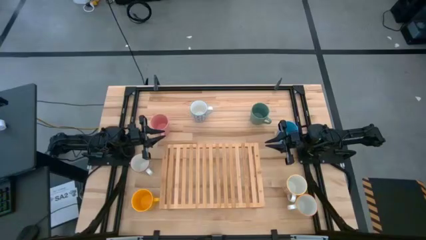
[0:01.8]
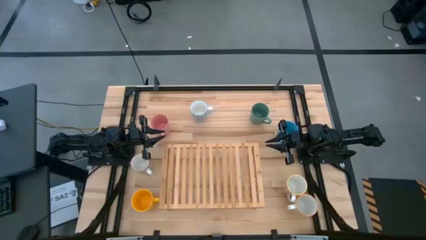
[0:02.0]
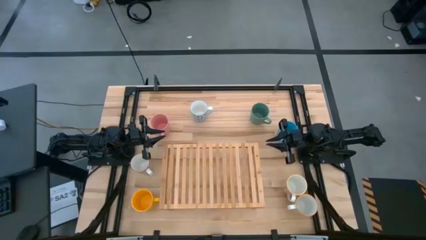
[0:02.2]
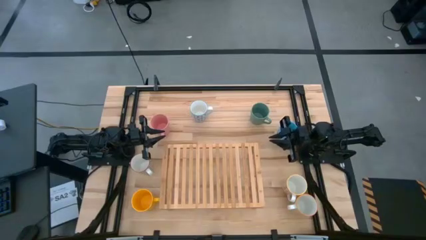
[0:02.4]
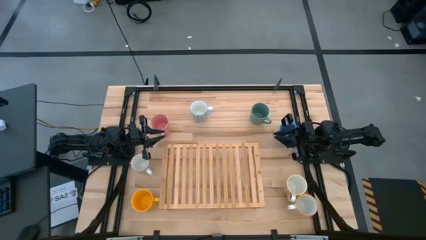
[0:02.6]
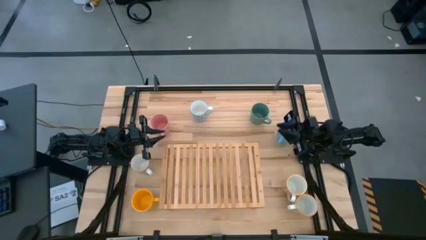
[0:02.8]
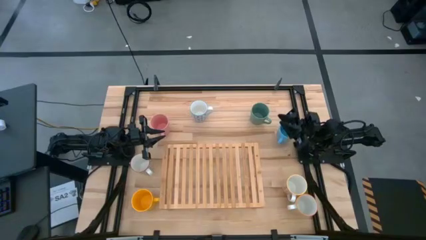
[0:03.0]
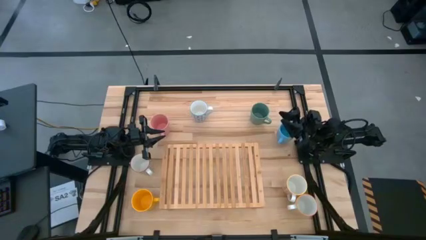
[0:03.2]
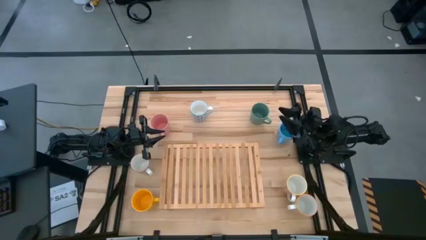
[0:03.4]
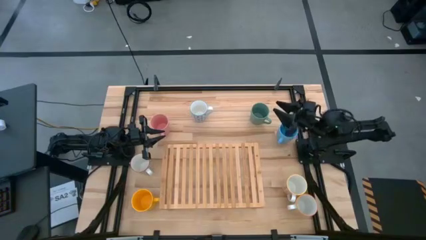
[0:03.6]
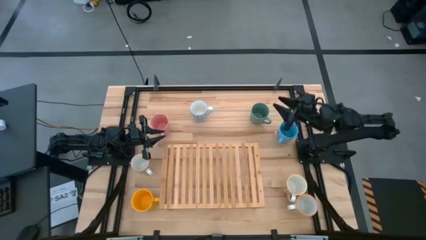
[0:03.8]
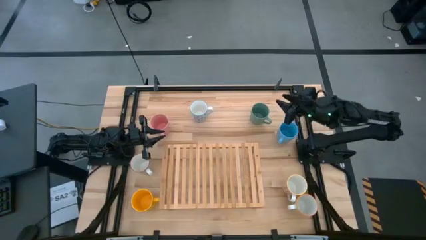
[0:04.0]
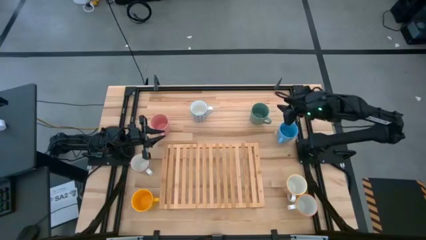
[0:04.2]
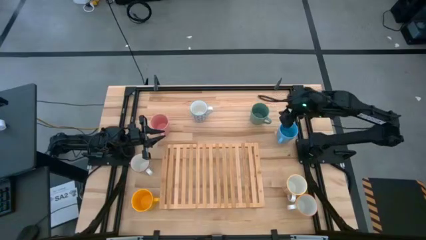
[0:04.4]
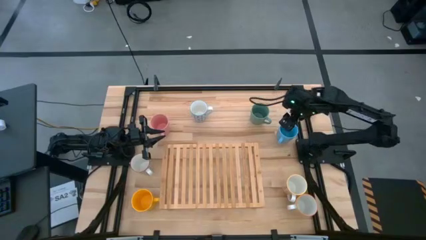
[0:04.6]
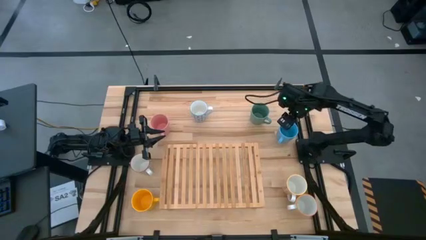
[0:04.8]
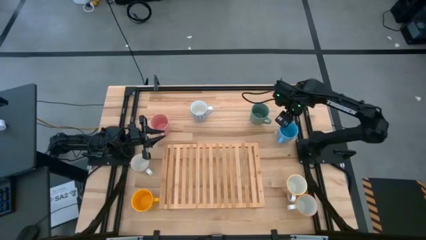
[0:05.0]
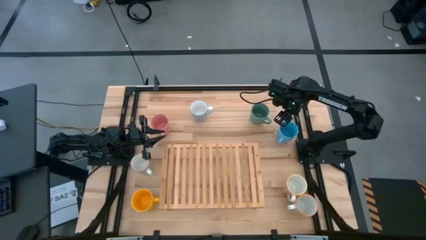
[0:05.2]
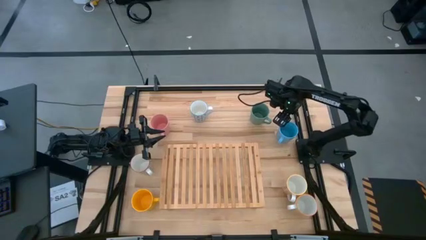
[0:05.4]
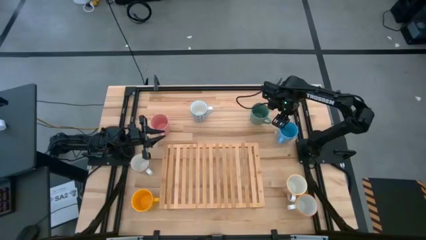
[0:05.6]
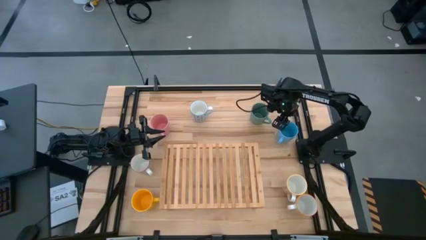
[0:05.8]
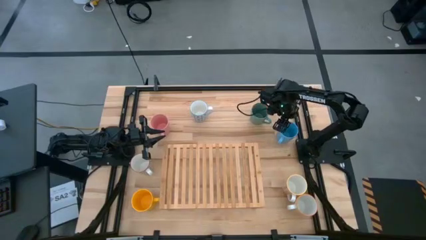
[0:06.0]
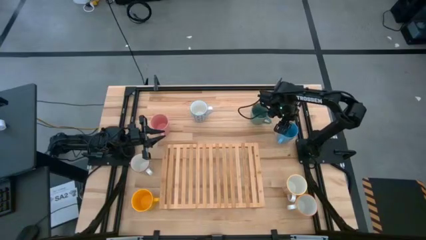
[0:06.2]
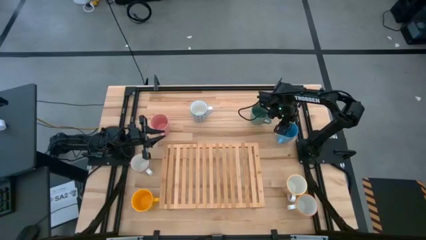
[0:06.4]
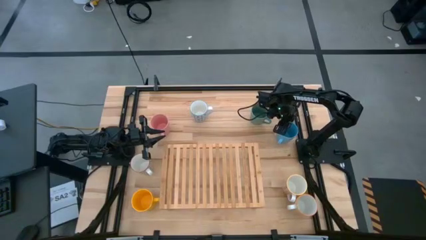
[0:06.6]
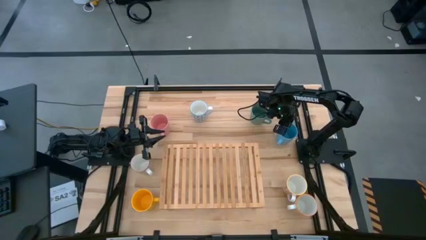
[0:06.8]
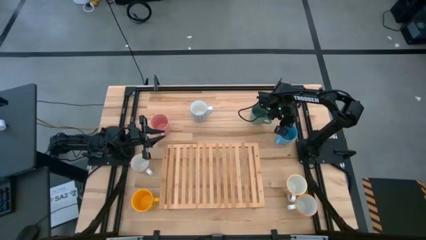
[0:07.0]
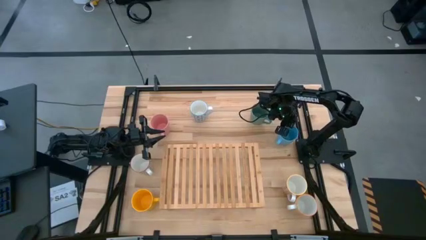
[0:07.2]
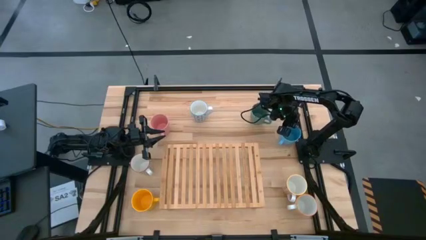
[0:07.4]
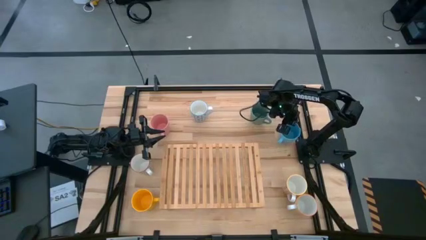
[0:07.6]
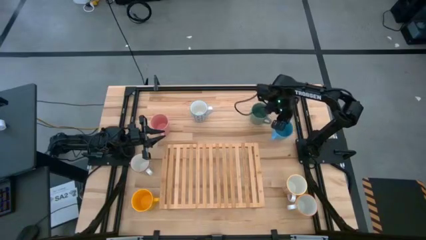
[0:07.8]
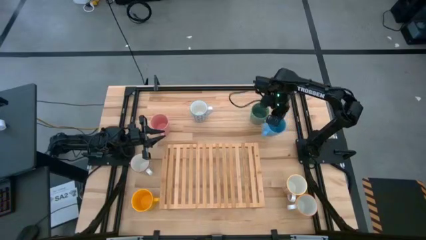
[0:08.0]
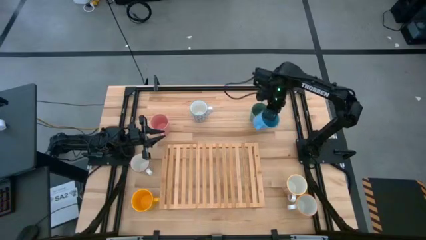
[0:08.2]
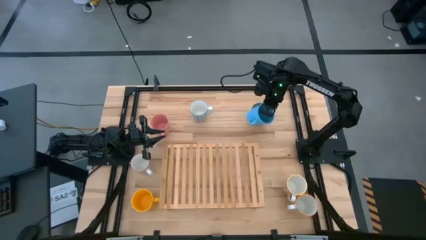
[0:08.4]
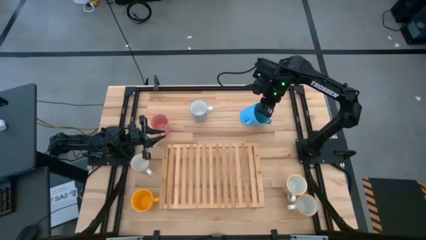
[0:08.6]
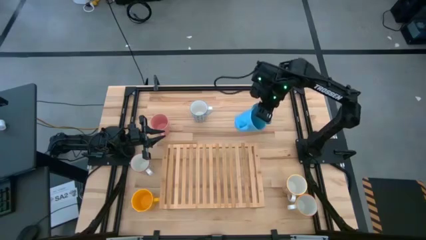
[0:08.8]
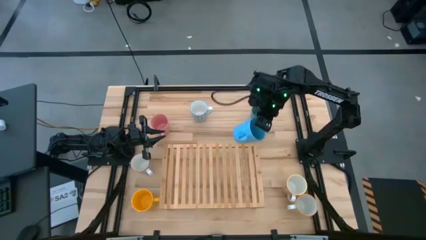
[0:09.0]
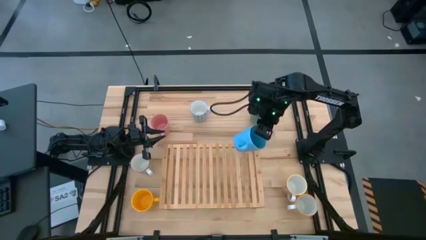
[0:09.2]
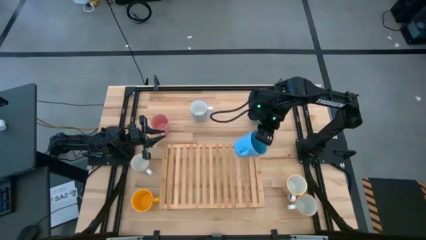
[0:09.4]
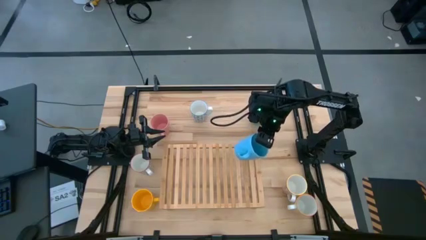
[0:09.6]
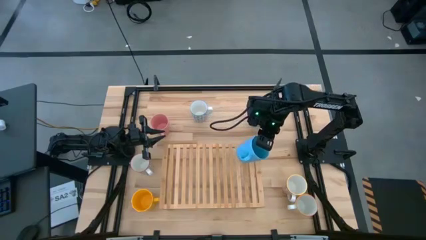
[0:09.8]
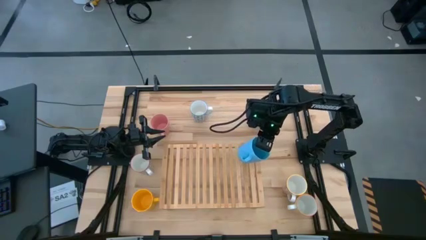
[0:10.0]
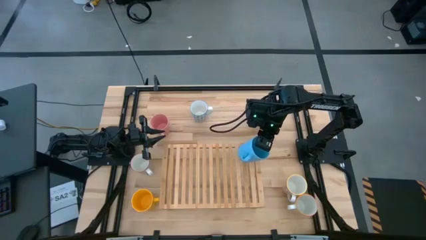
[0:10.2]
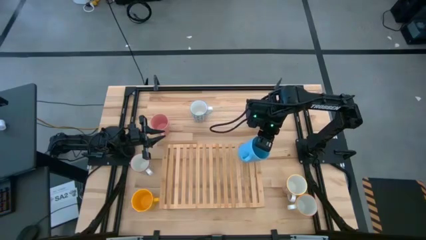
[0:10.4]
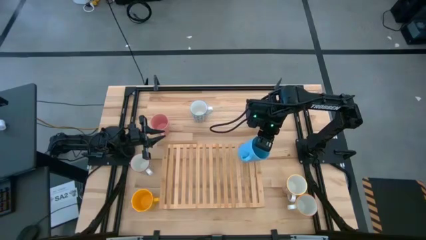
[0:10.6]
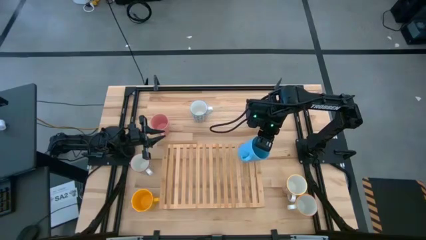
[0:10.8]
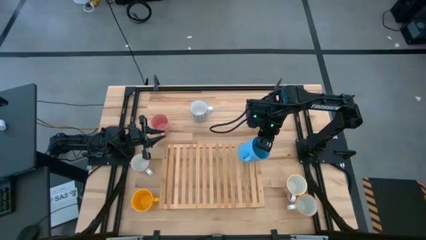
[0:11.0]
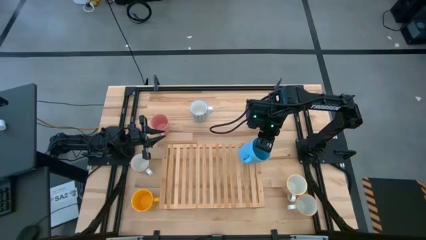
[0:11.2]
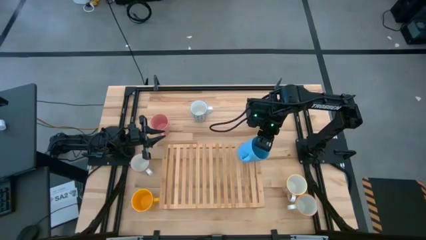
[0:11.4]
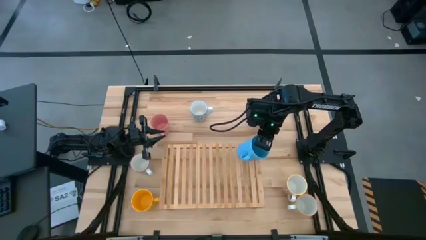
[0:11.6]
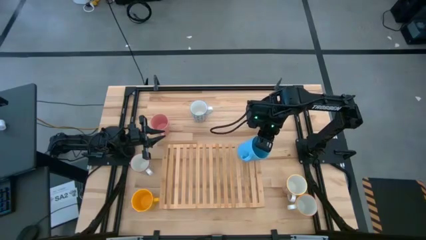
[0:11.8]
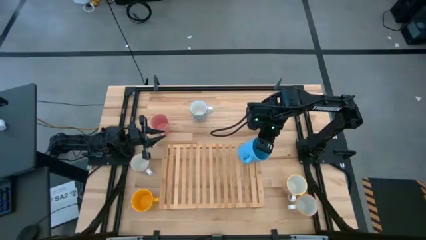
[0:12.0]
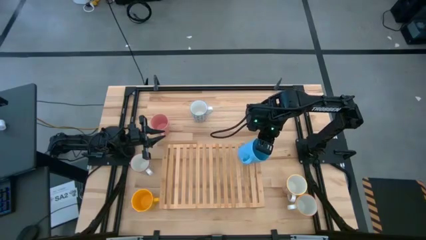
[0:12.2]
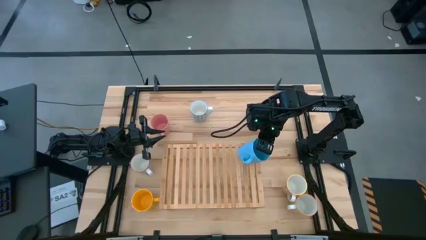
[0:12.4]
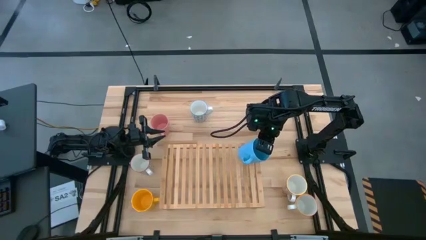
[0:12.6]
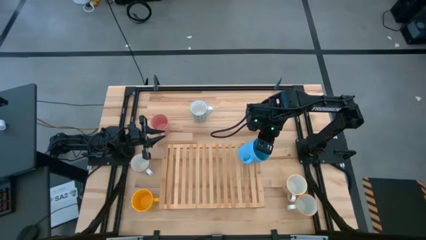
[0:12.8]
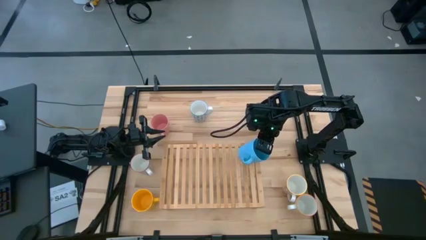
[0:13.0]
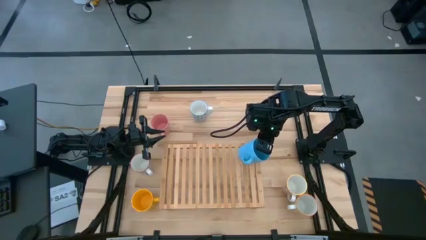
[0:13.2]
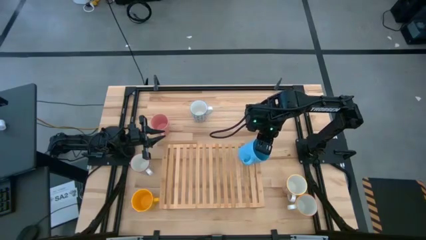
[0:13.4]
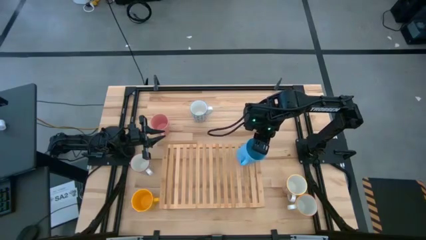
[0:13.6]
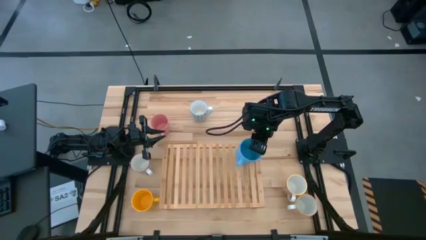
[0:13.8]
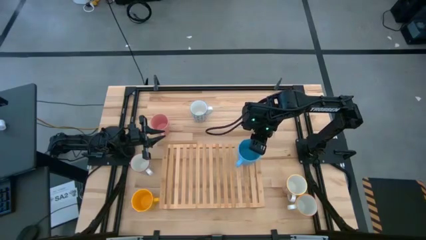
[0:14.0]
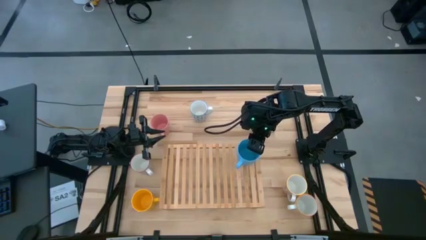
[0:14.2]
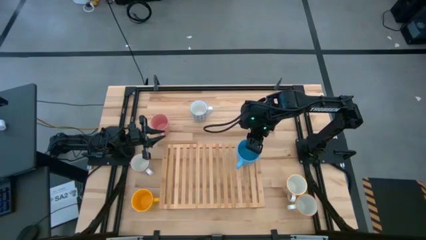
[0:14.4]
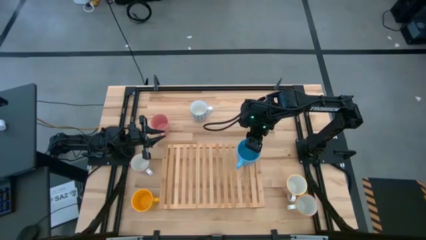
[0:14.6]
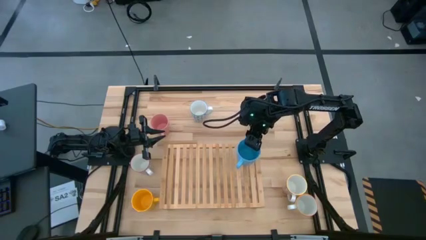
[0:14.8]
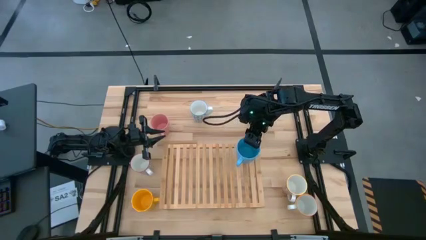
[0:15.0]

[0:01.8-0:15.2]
Task: Place coffee mugs
Put the light blue mug on the shelf
